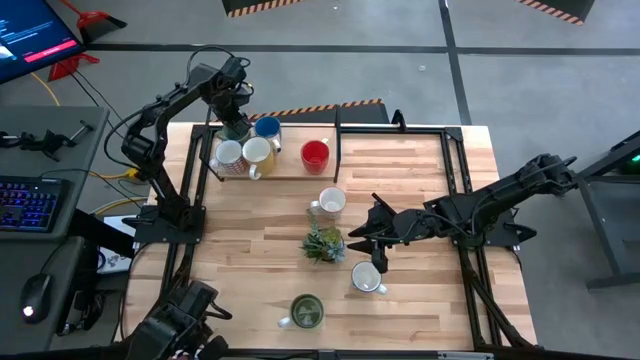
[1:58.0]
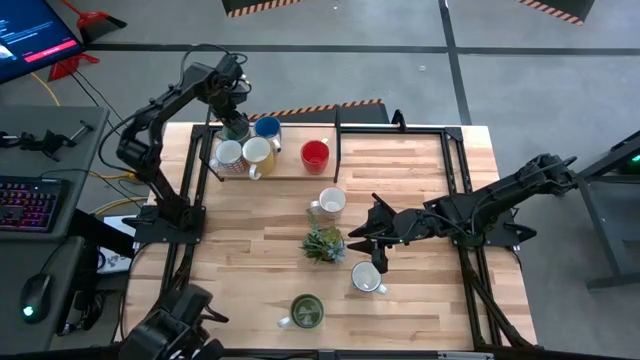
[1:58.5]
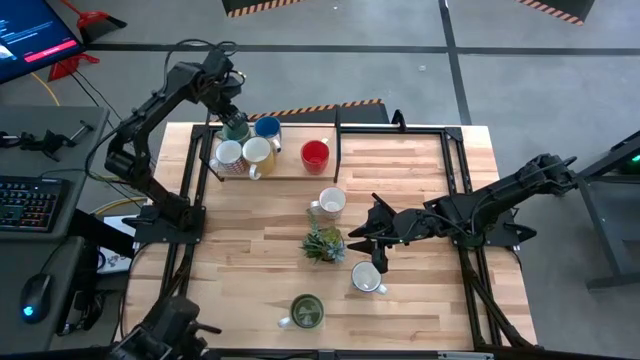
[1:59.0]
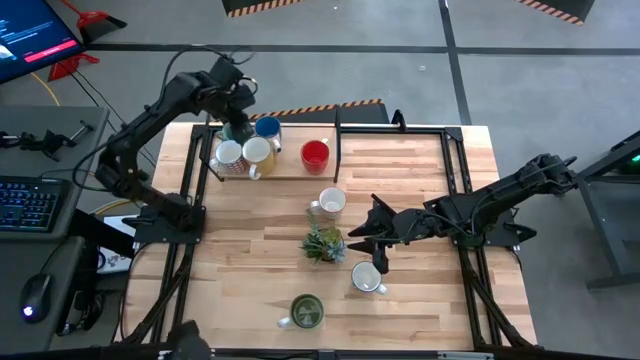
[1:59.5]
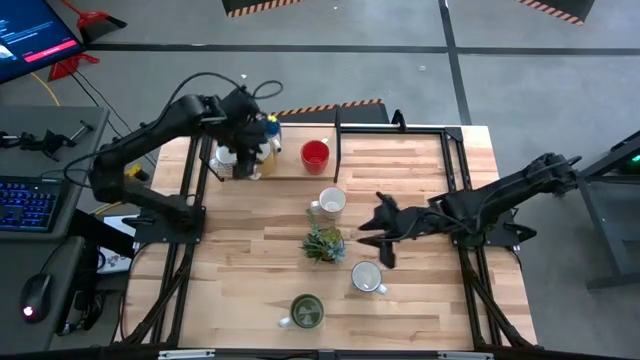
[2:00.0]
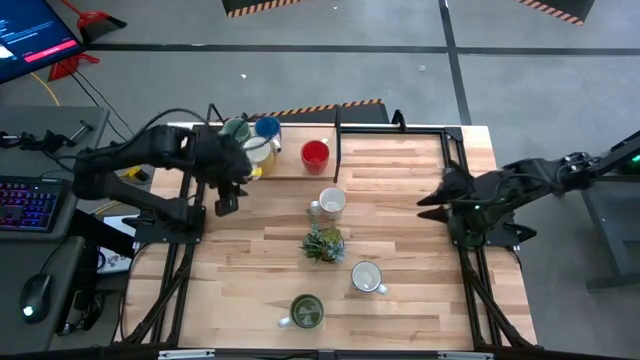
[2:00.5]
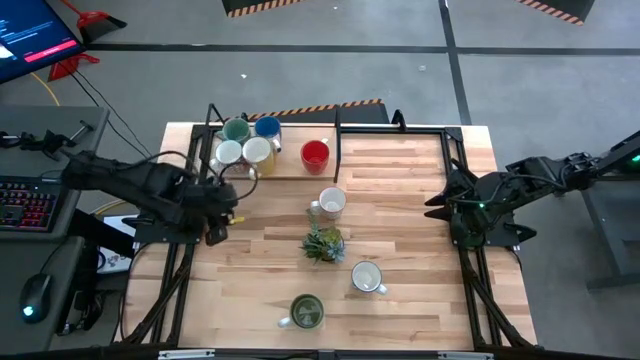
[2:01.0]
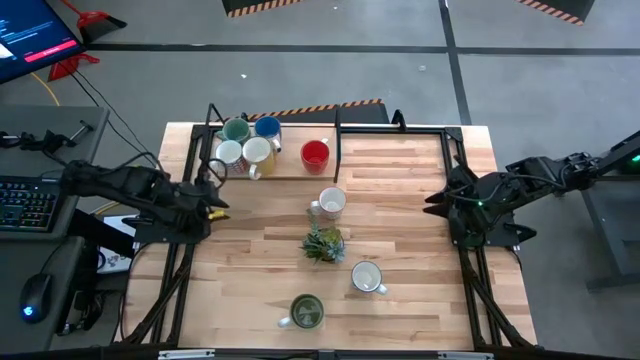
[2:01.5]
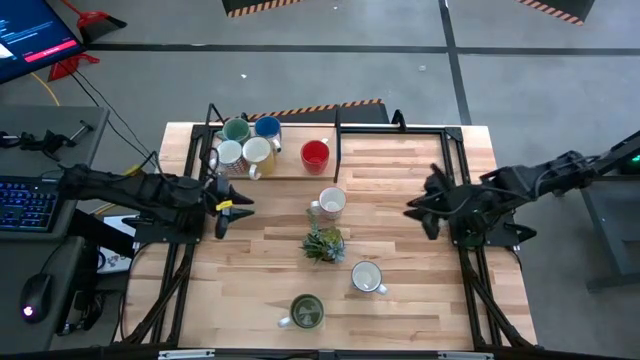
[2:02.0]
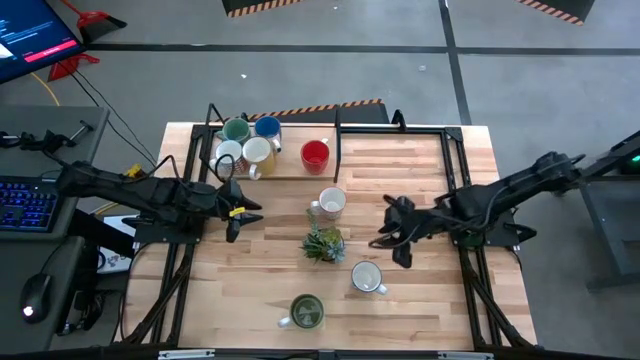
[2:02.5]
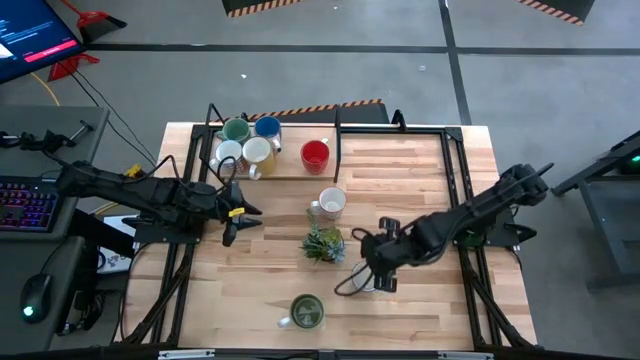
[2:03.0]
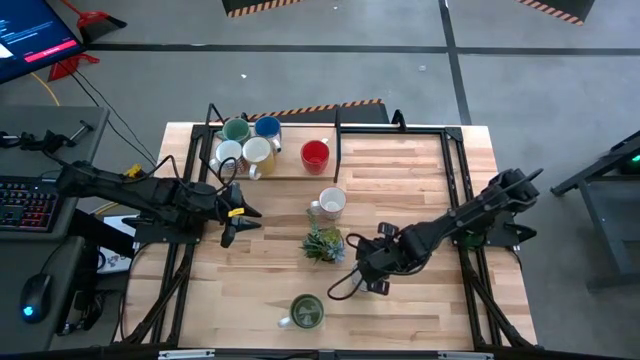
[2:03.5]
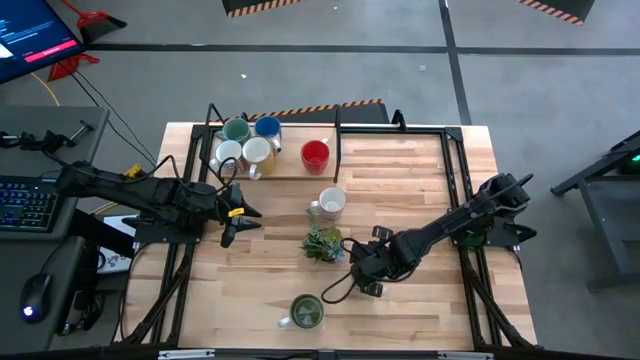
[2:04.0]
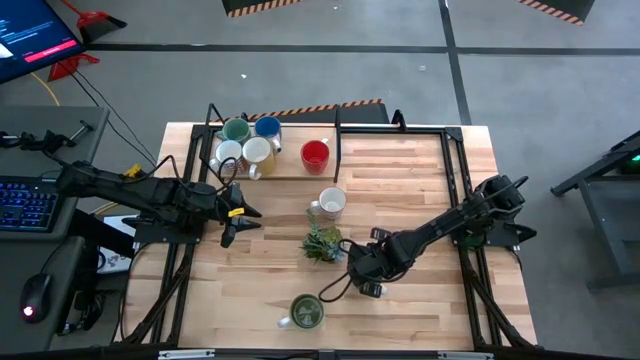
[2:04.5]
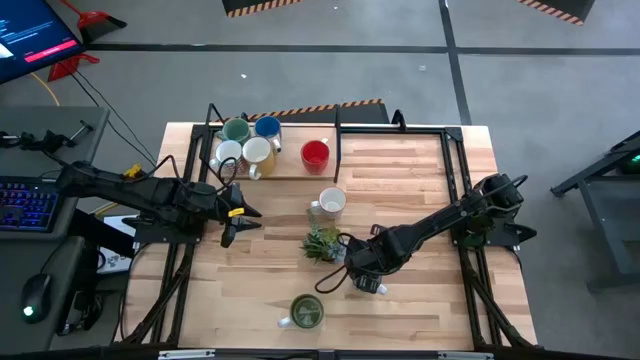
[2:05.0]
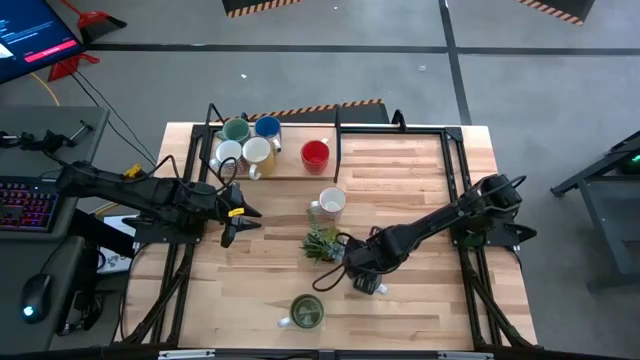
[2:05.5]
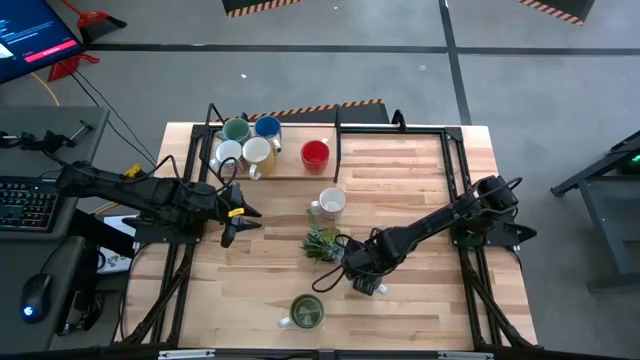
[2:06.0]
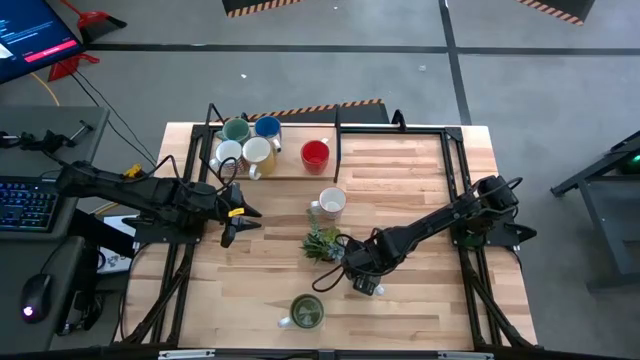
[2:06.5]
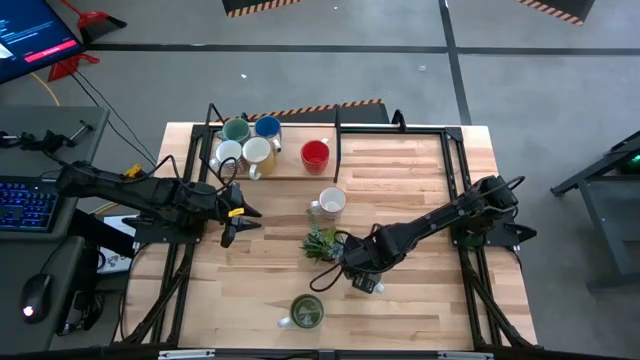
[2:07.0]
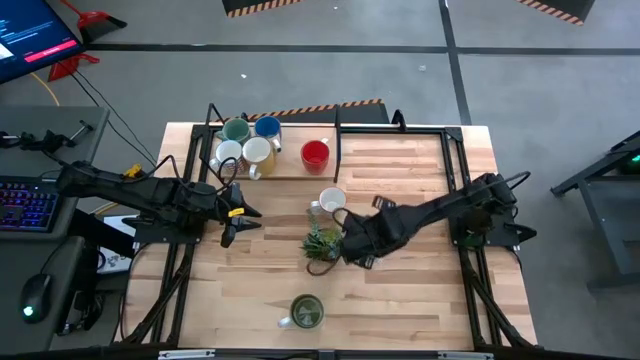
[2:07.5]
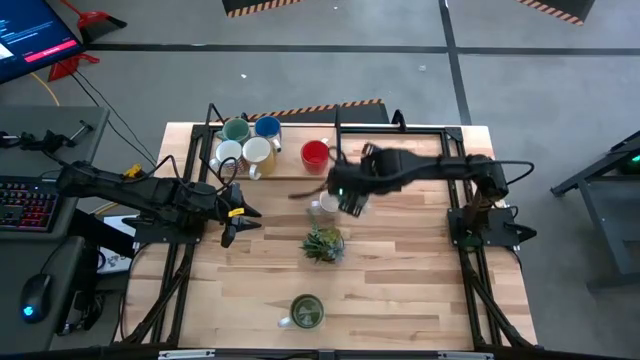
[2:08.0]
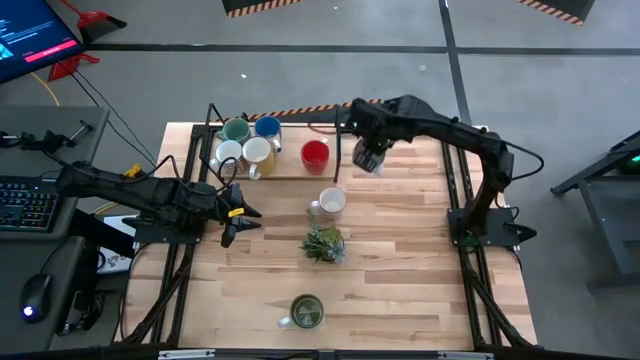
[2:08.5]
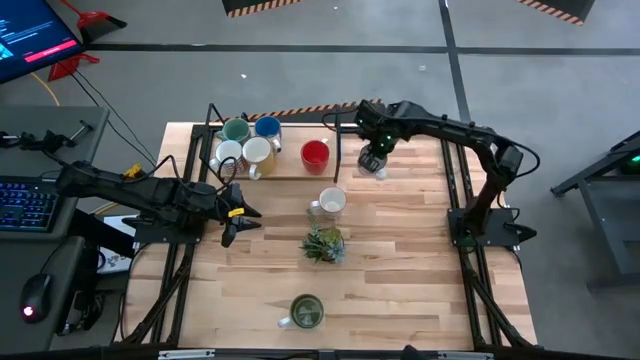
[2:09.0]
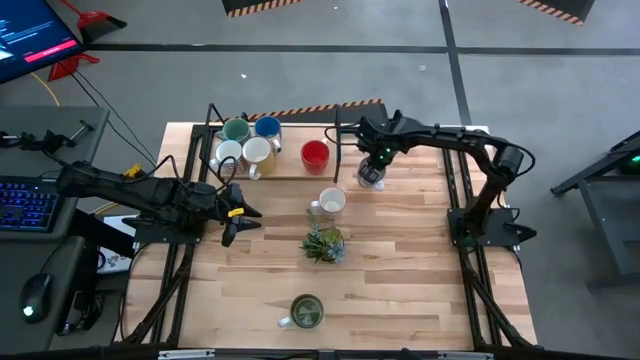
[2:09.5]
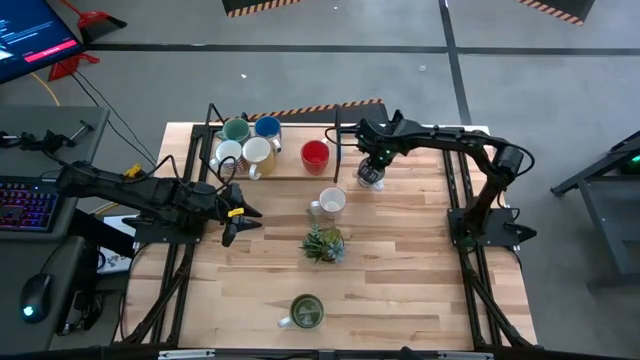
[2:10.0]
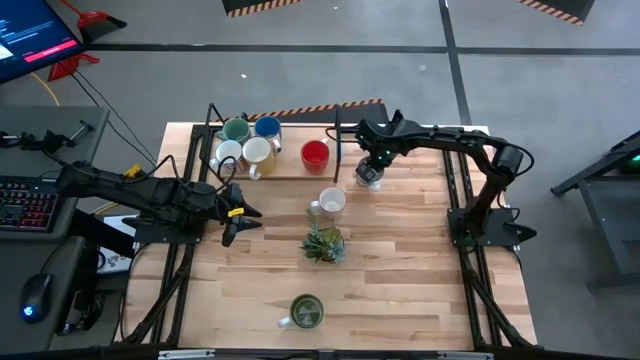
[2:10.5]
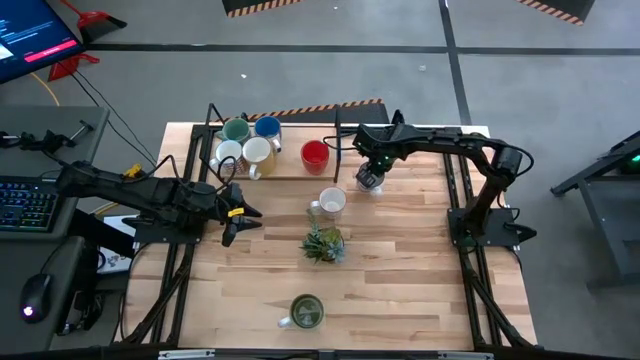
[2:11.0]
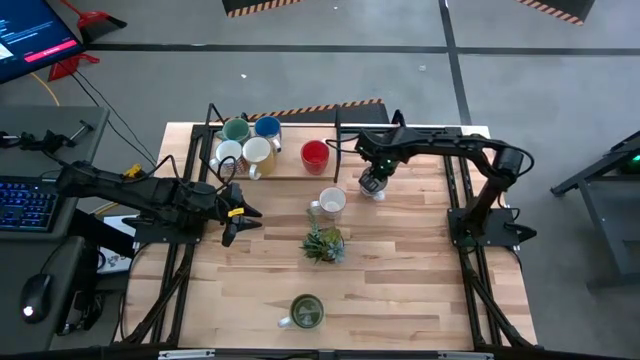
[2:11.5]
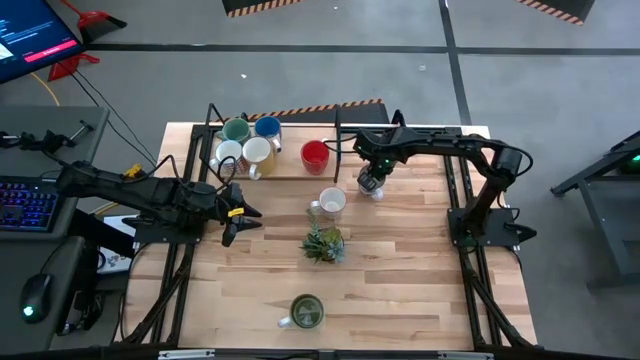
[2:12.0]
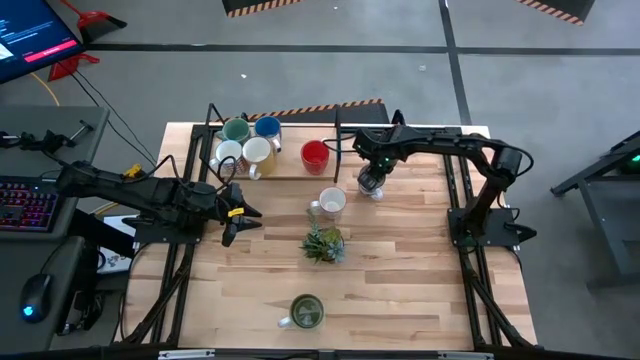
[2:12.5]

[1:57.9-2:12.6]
Task: Place coffee mugs
Move the blue patterned mug to the top center of the table

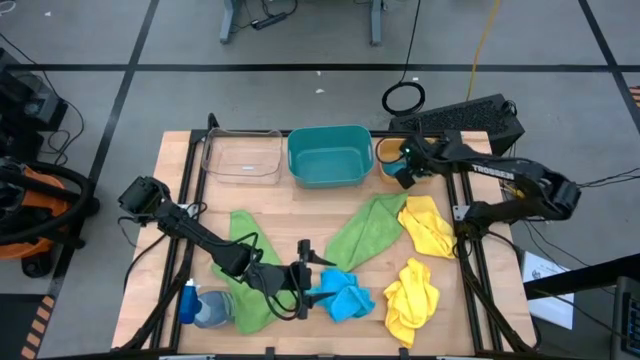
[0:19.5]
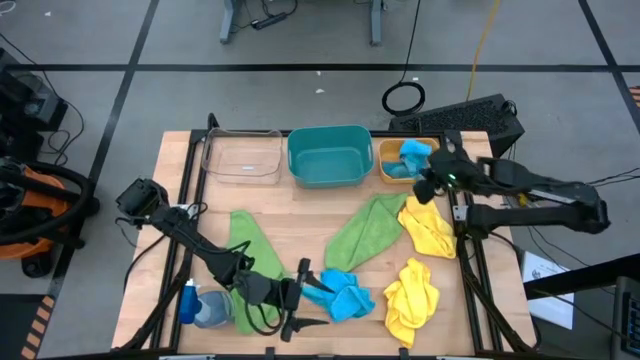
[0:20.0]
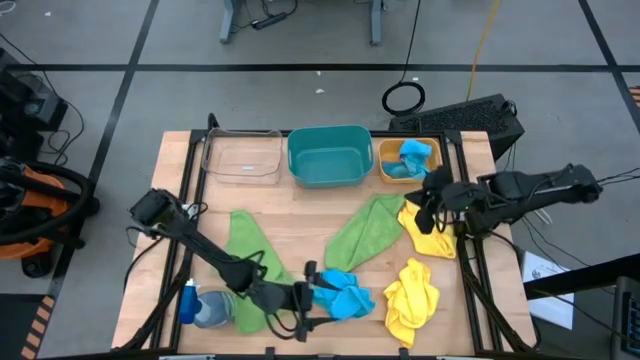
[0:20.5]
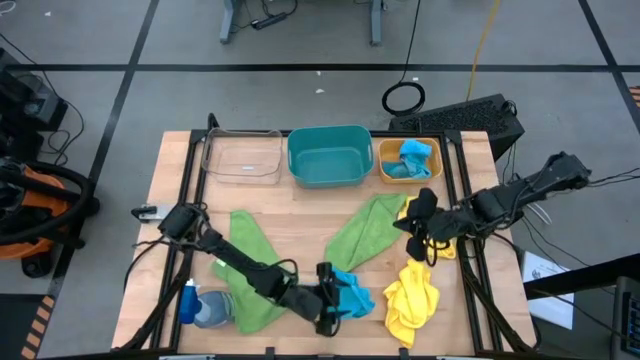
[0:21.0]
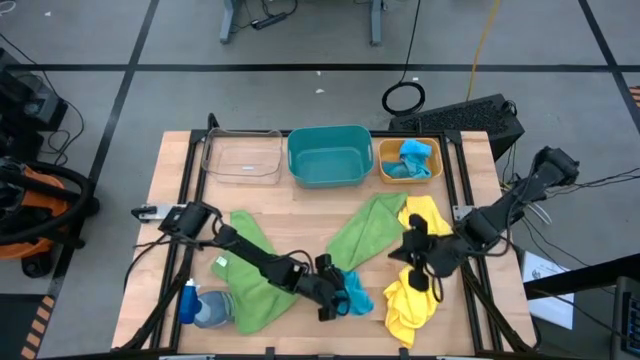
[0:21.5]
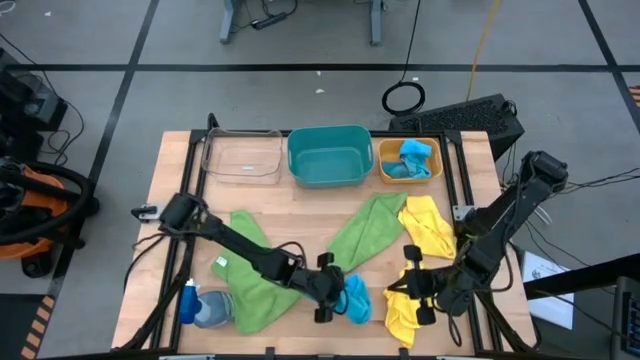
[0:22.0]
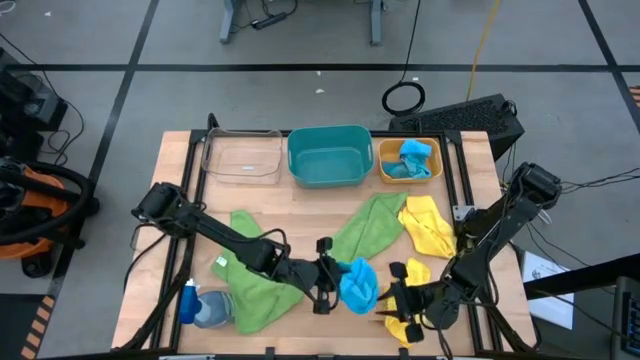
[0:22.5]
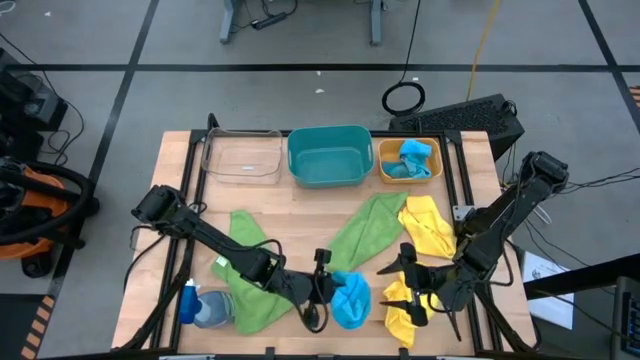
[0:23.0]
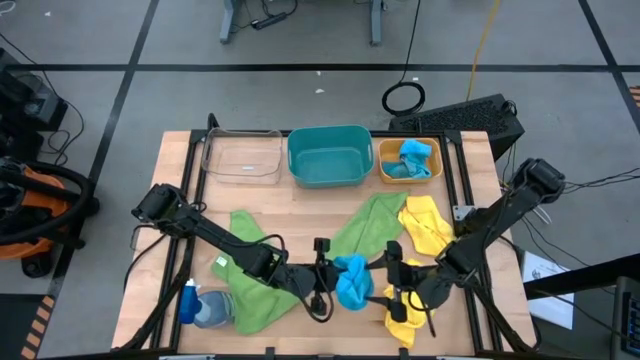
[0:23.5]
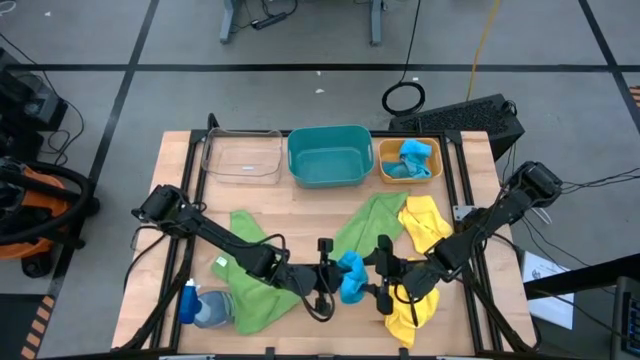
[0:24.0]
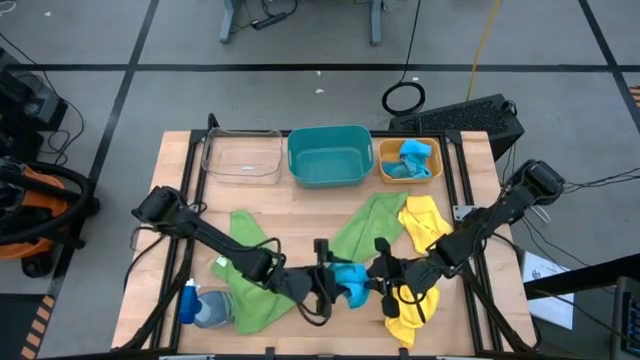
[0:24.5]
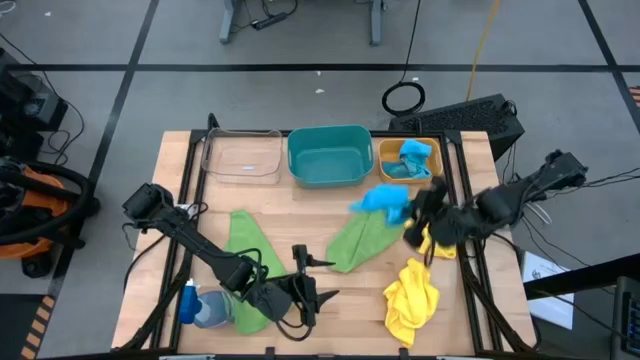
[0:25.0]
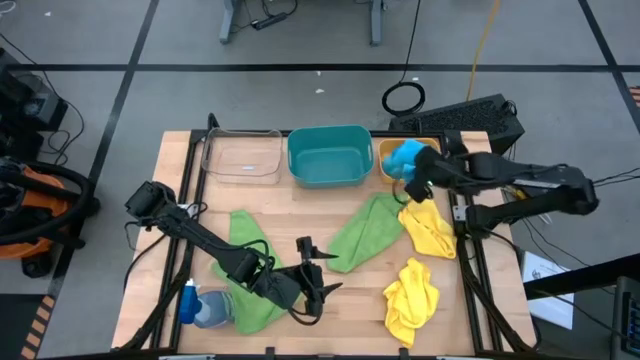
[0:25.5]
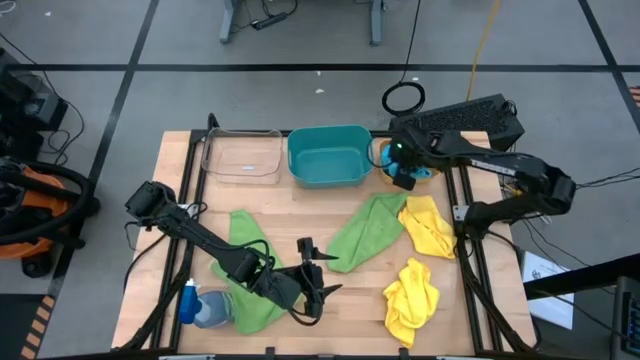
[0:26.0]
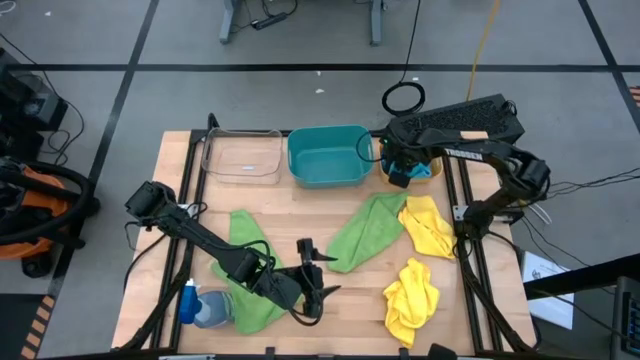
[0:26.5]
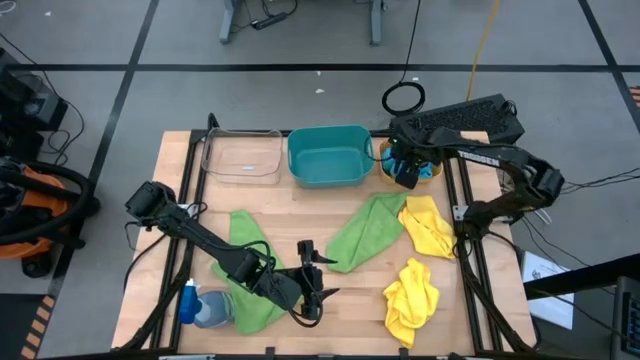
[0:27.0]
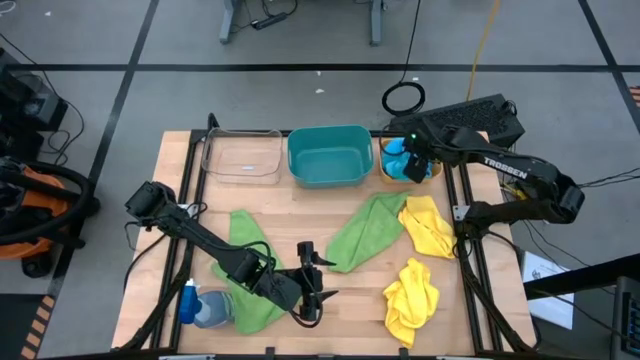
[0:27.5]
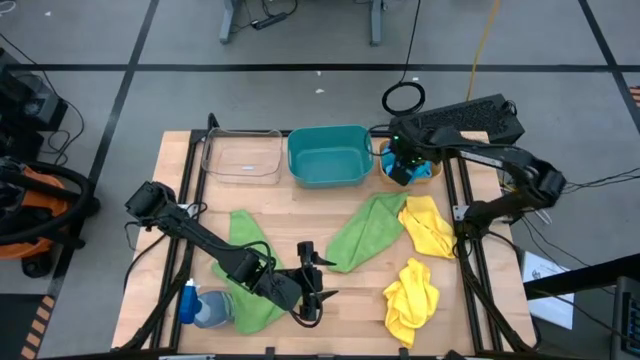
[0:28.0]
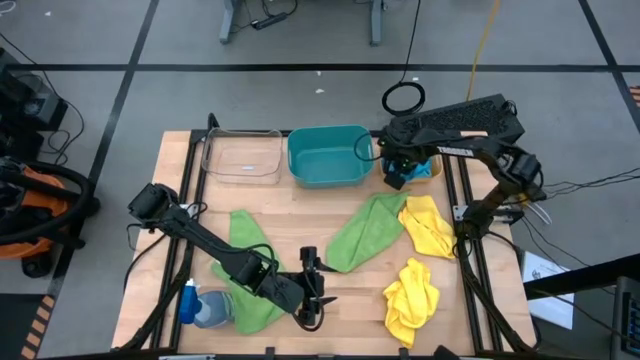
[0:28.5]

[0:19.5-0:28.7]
Task: Sort microfiber towel by color & place in baskets
Put the blue towel into the yellow bin
